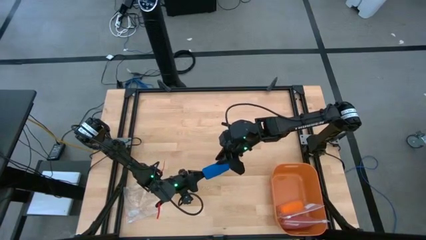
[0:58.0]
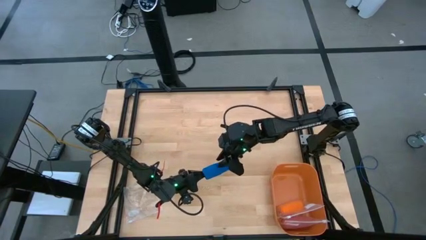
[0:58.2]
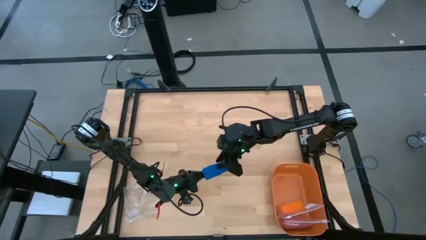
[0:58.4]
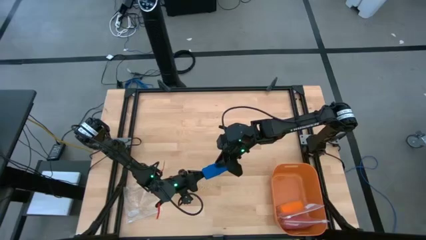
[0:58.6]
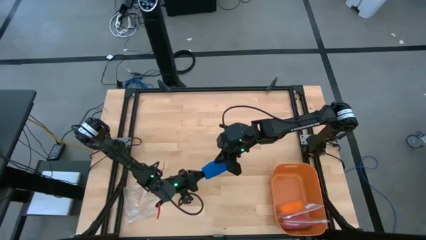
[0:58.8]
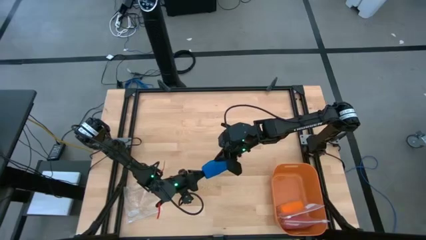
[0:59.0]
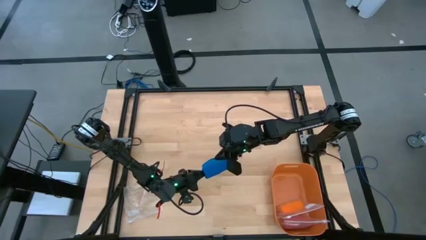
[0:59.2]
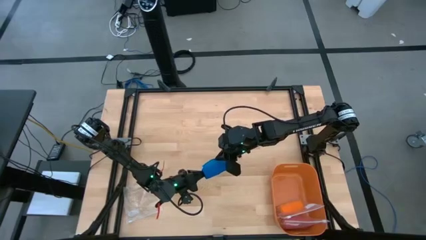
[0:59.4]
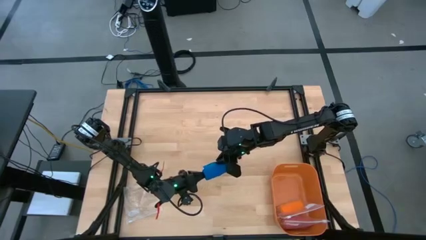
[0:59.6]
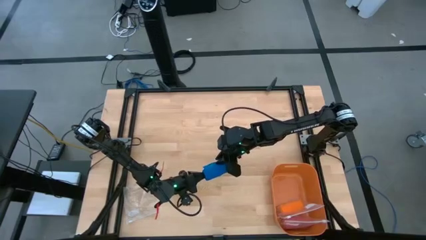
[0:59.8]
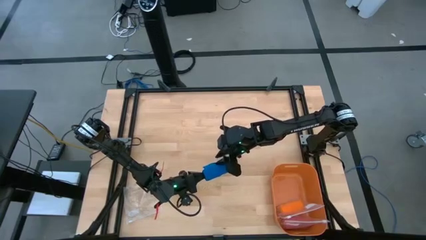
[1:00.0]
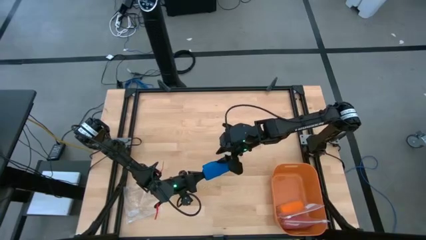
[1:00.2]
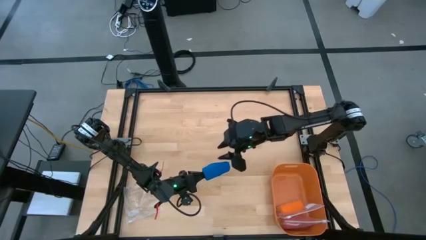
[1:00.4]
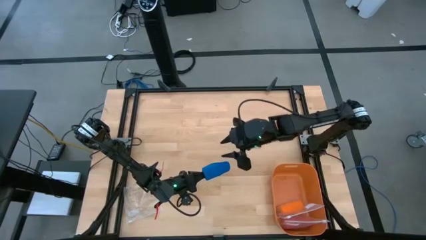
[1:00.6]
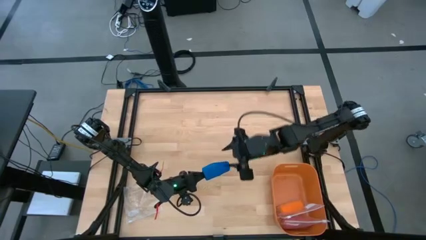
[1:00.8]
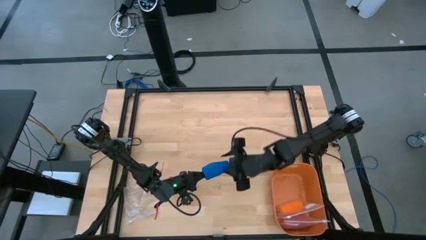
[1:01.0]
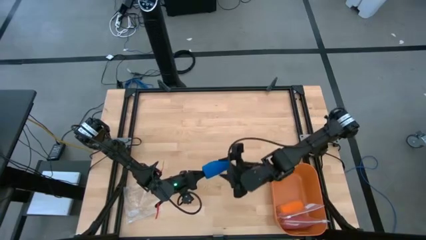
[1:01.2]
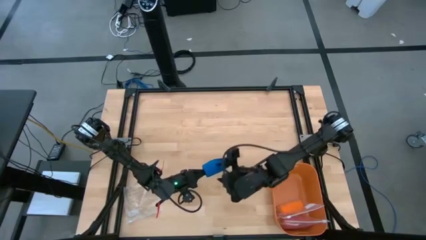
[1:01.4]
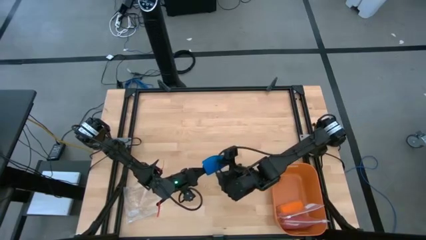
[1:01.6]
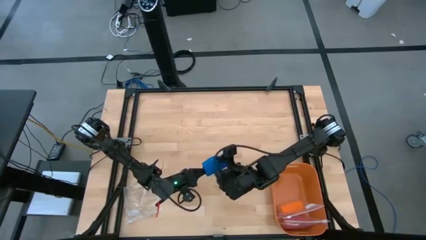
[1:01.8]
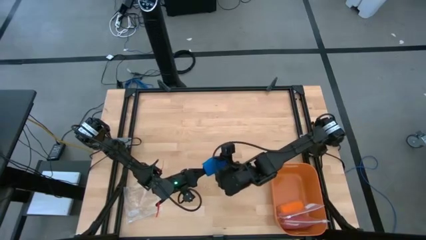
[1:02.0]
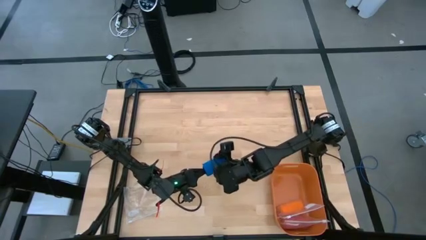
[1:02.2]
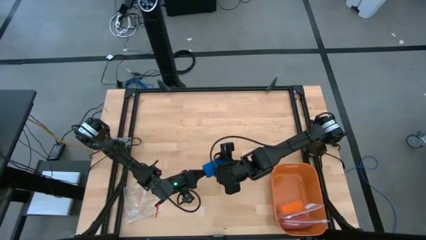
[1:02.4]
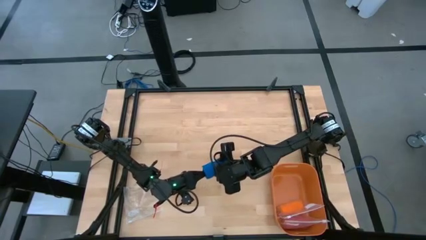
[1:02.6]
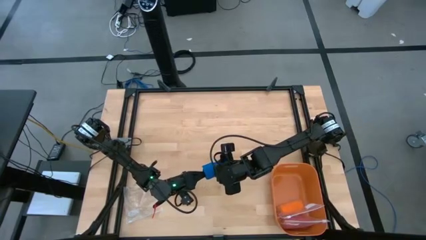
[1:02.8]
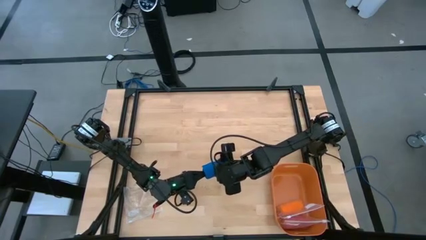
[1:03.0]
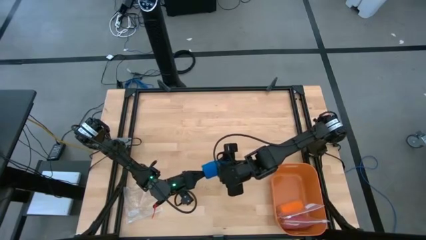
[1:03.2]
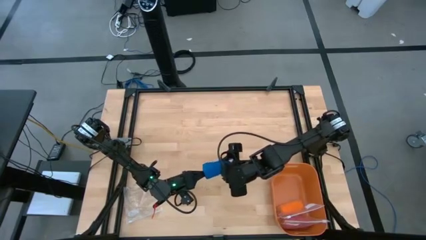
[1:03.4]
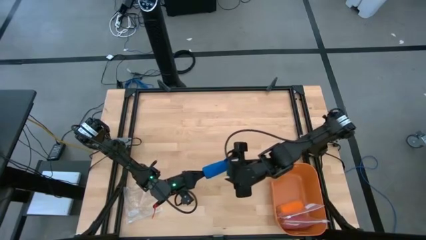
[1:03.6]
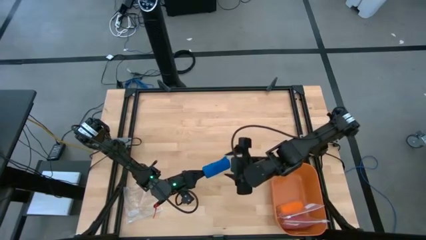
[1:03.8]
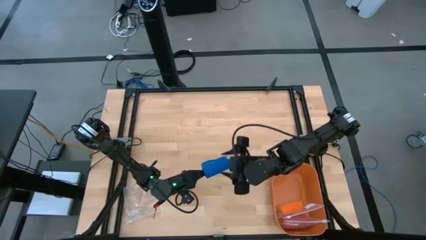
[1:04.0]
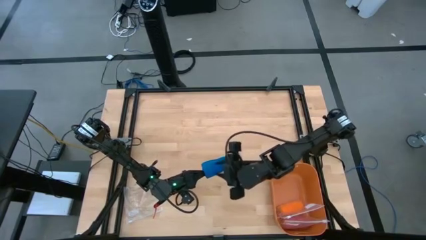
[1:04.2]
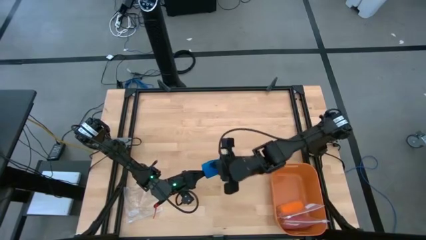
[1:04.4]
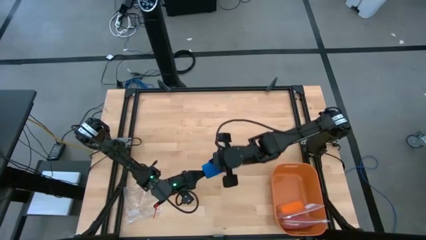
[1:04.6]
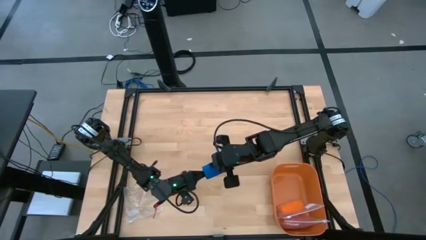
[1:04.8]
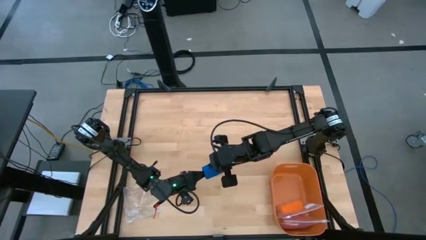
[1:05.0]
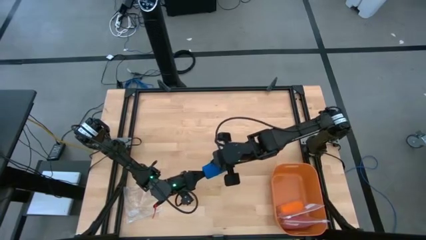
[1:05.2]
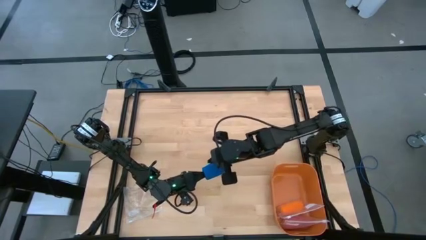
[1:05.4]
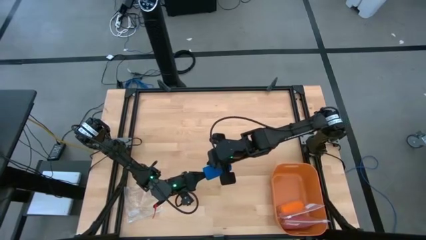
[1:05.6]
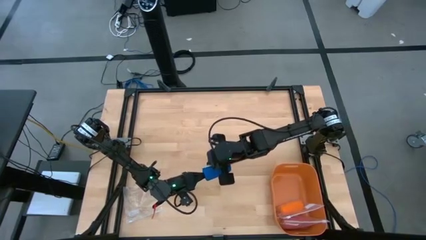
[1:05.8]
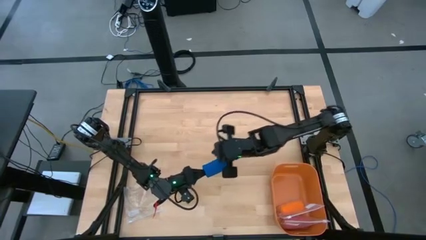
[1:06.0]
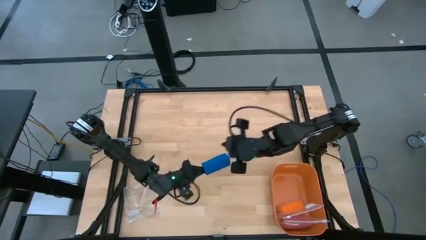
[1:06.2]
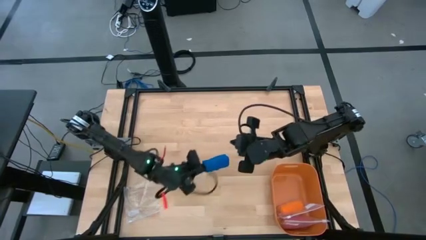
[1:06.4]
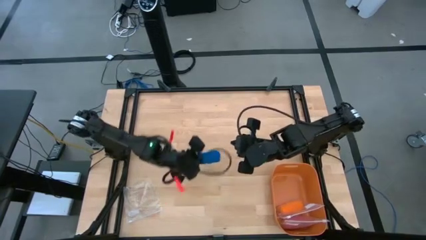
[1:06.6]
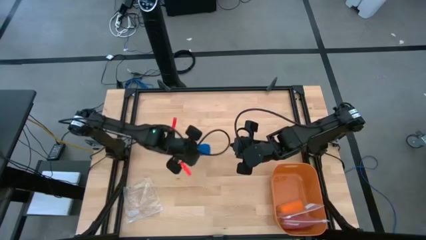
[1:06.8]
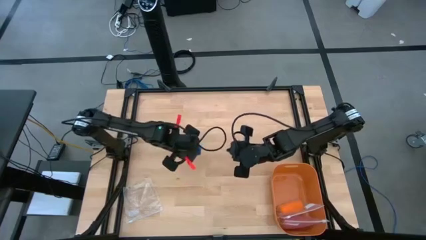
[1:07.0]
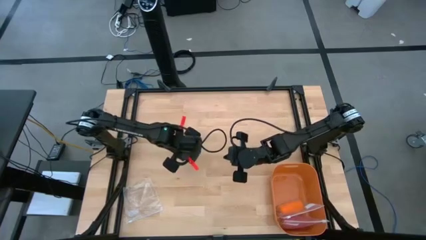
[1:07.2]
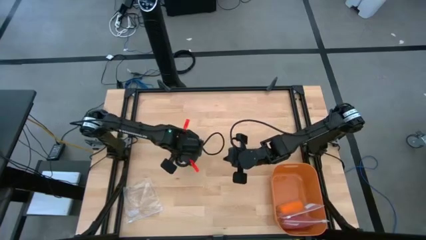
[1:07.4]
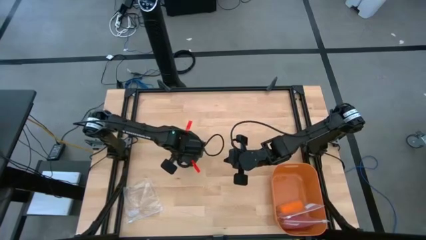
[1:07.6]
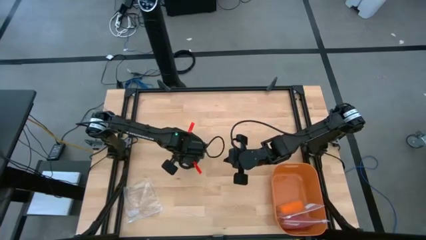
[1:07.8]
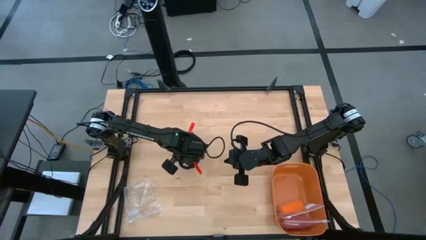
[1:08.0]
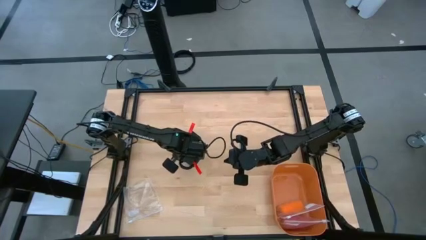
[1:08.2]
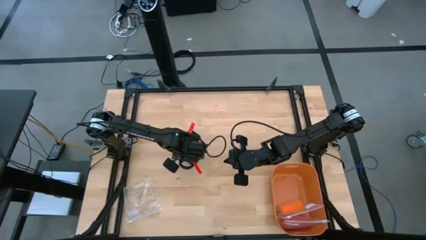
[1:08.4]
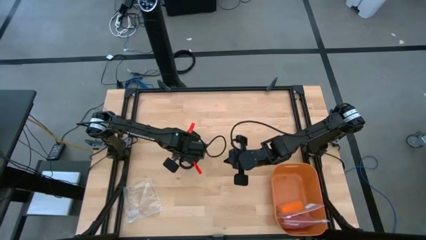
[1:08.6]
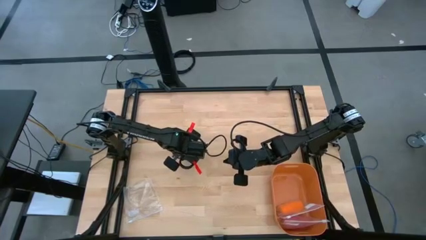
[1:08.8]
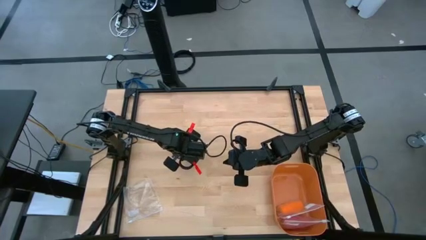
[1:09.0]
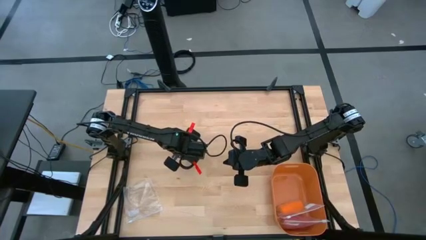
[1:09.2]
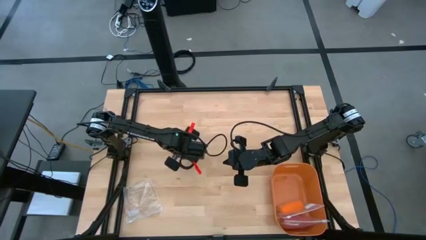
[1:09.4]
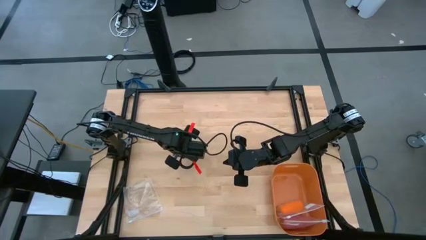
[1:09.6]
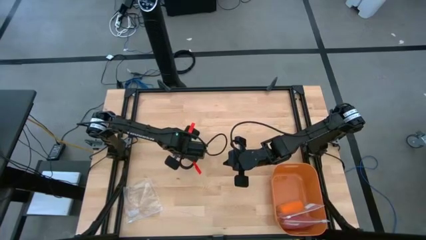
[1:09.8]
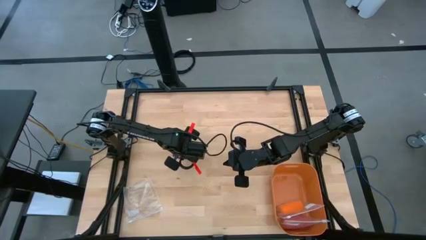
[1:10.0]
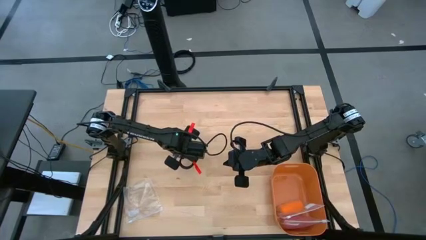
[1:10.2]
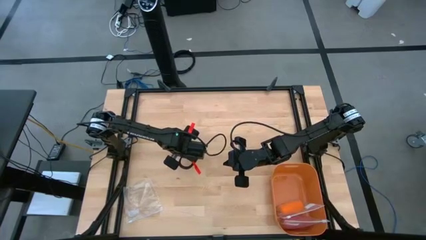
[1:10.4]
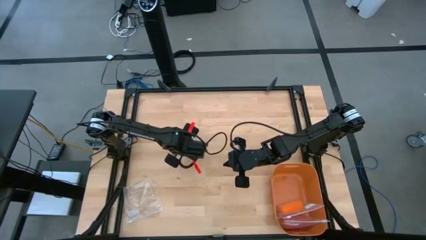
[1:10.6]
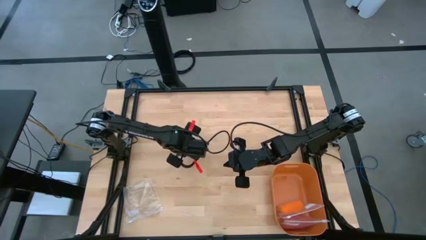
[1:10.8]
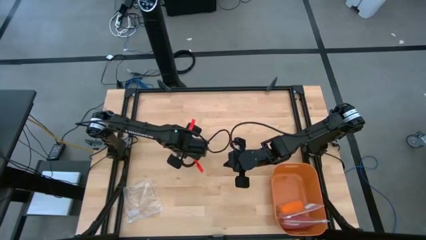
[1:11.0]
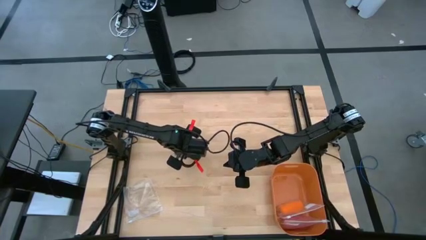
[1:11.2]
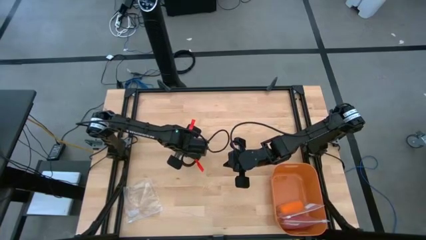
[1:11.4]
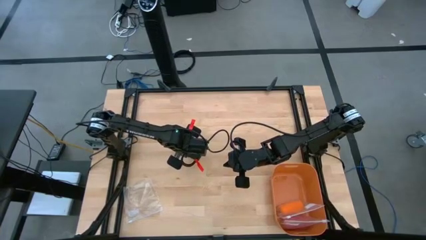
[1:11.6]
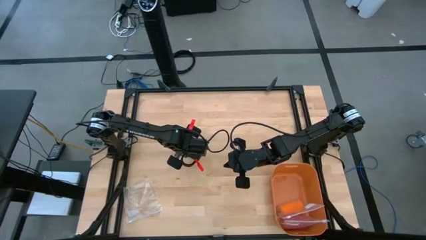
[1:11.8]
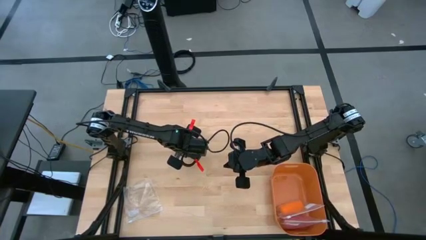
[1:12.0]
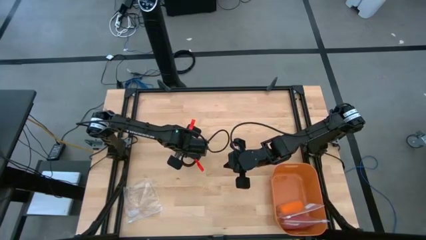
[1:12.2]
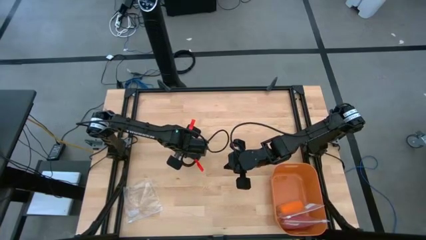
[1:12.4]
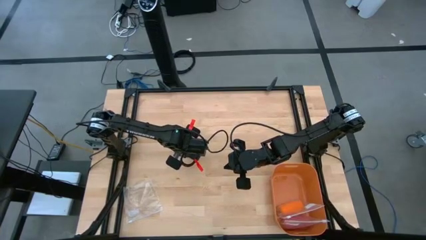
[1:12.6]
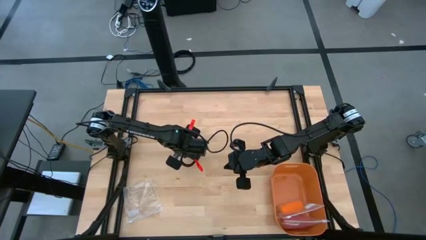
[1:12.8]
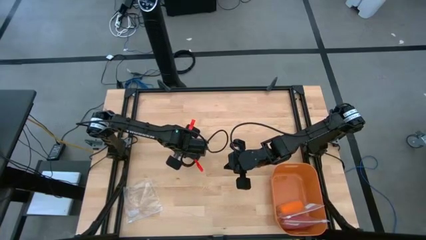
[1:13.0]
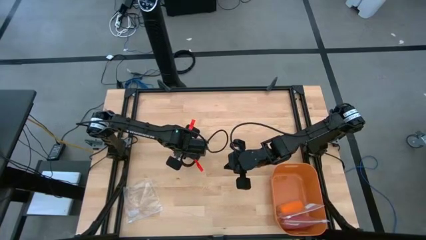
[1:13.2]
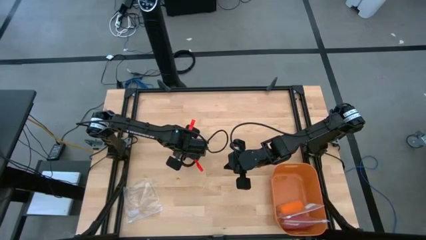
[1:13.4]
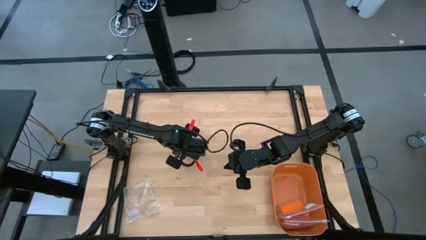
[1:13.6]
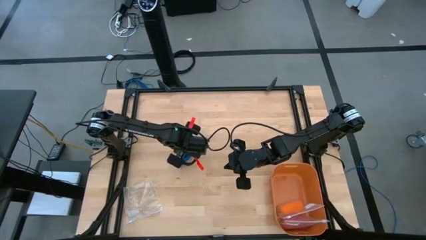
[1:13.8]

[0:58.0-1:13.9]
Task: Roll bandage
Roll the blue bandage
